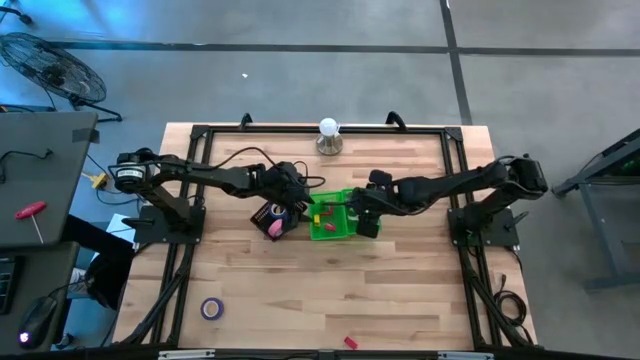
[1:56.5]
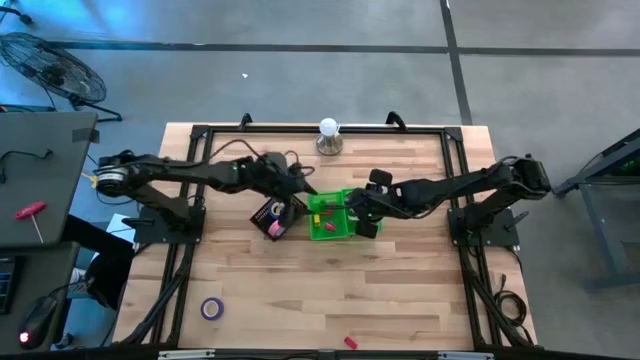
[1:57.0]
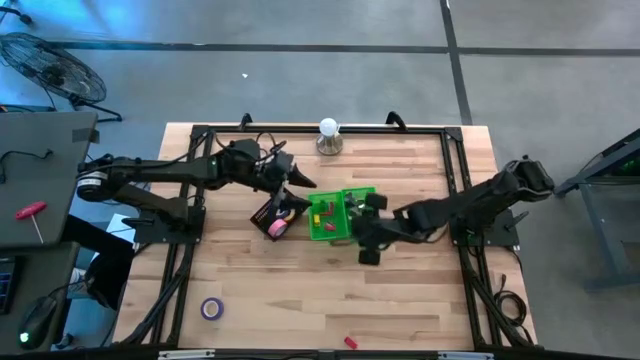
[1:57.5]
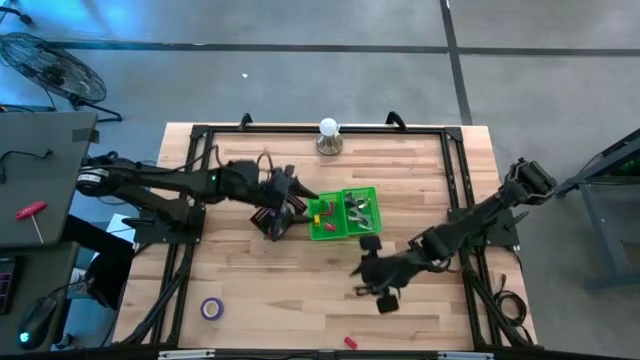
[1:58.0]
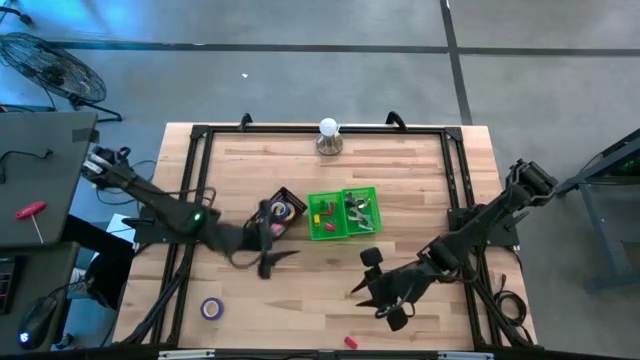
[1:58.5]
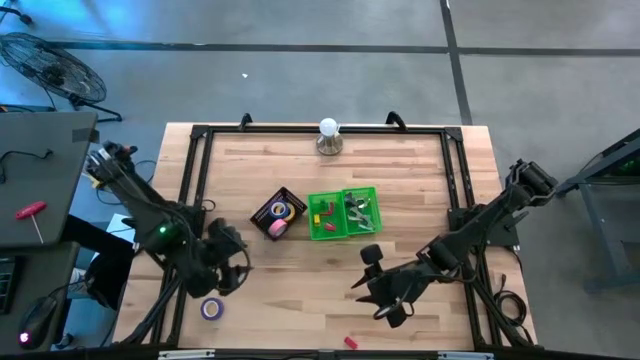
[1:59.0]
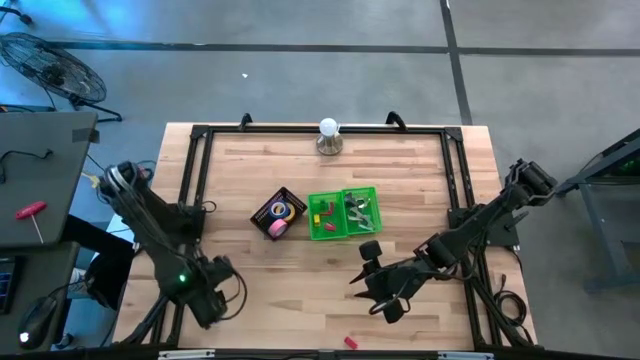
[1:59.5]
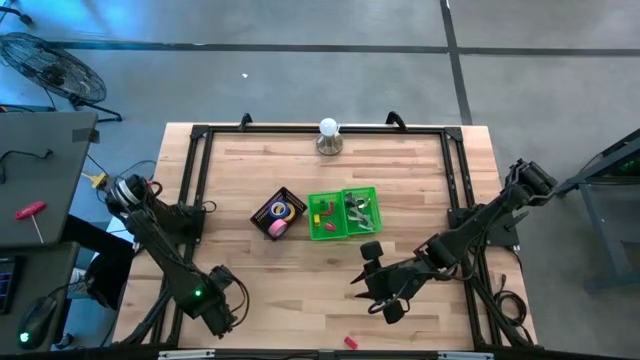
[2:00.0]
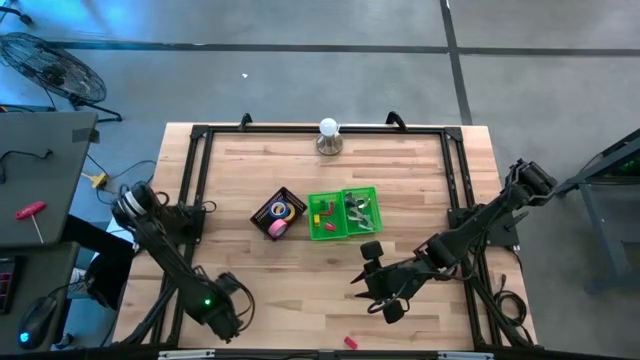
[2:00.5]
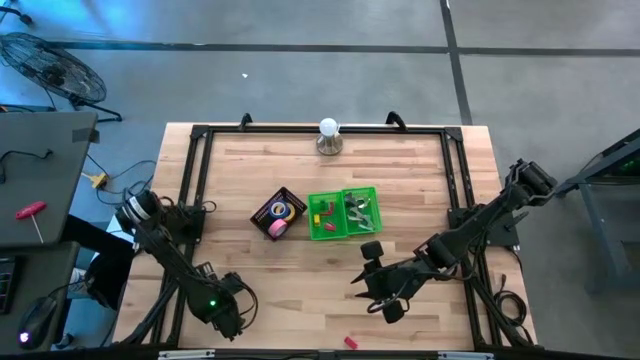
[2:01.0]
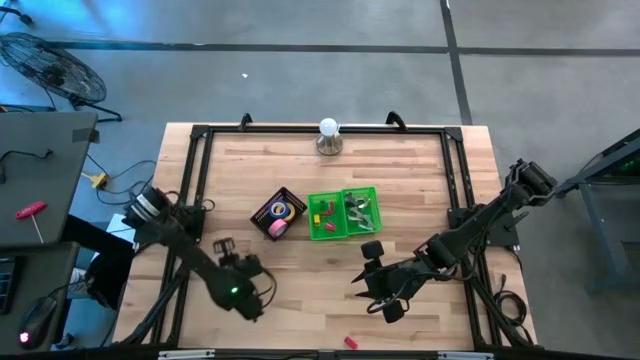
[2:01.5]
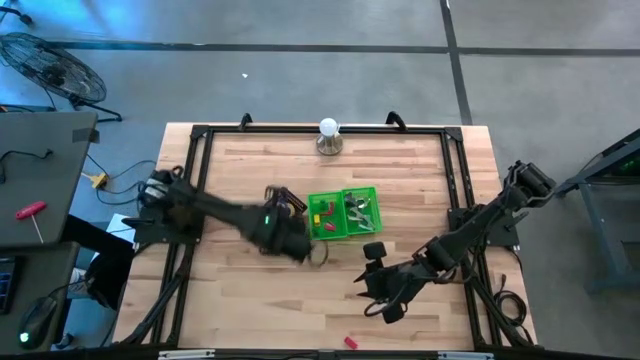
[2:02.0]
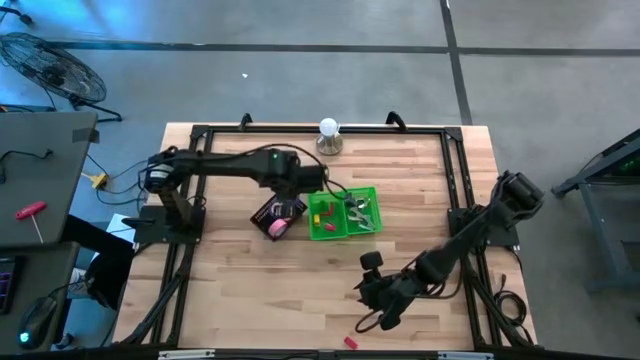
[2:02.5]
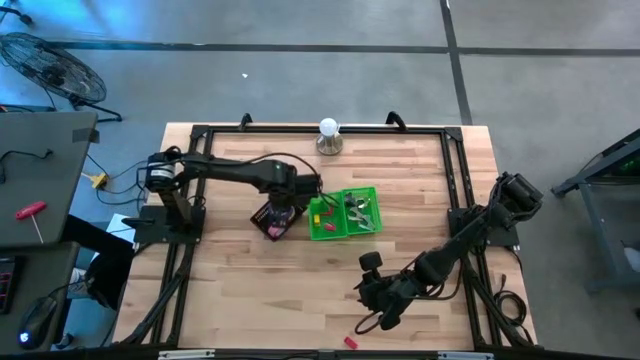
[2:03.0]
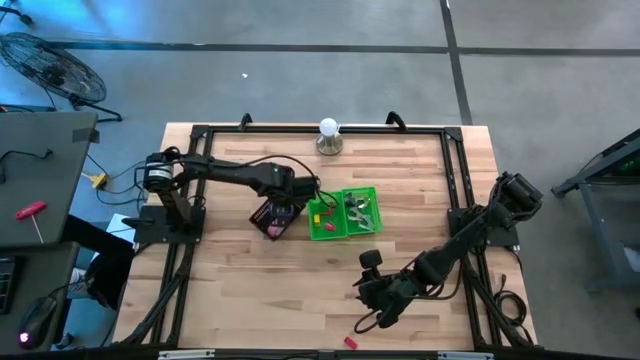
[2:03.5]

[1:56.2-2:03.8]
Task: Pick and place Stapler, Stapler remover, tape
Put the blue tape into the black bin

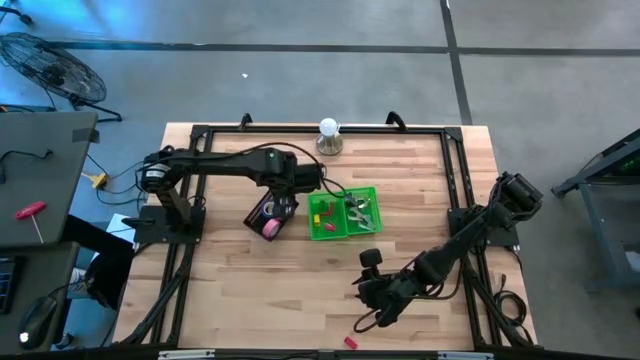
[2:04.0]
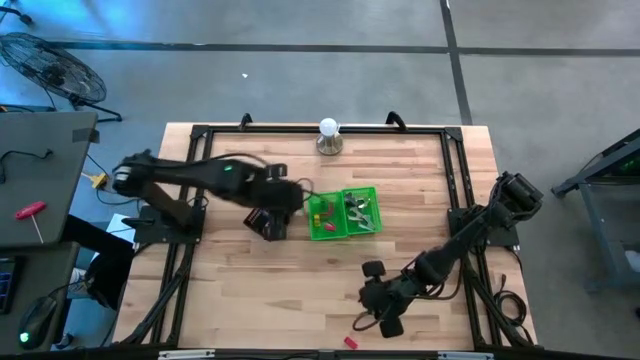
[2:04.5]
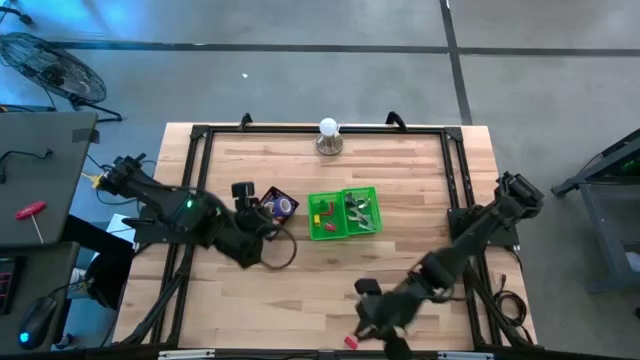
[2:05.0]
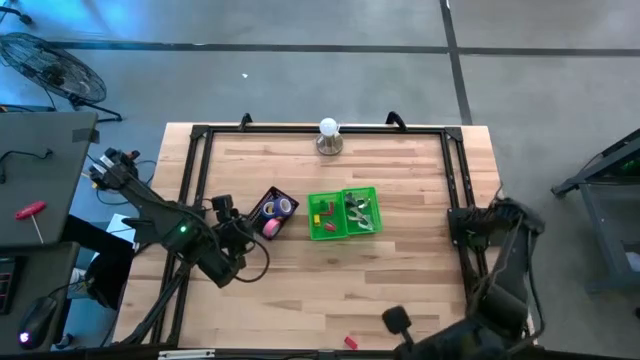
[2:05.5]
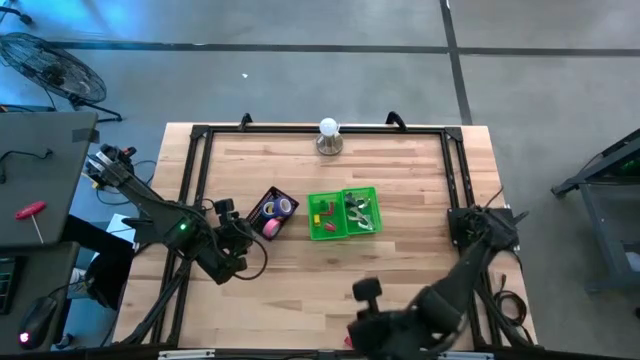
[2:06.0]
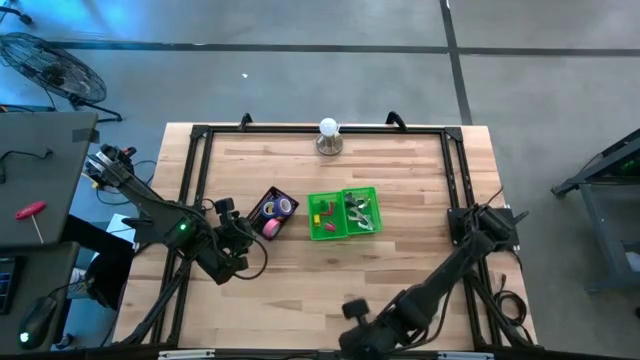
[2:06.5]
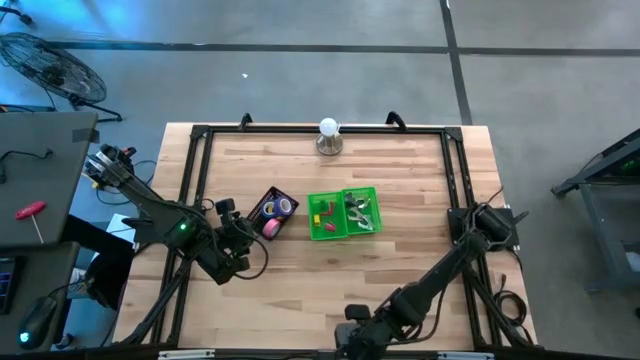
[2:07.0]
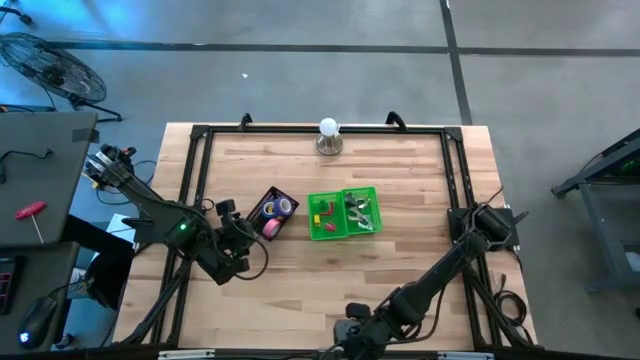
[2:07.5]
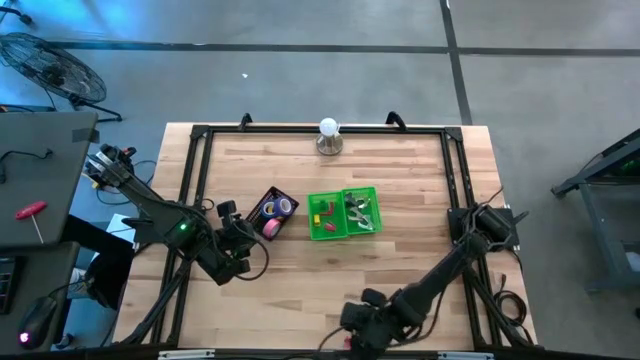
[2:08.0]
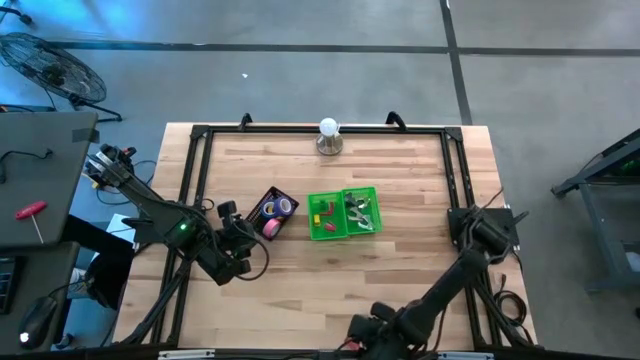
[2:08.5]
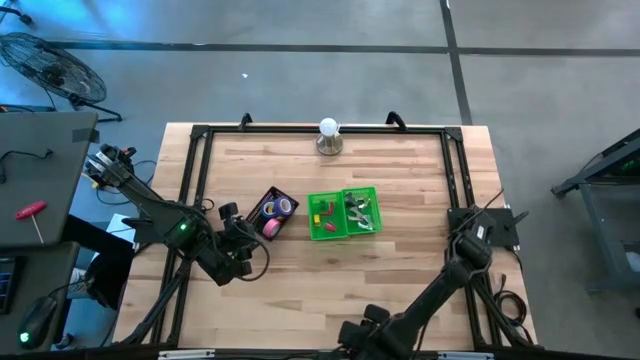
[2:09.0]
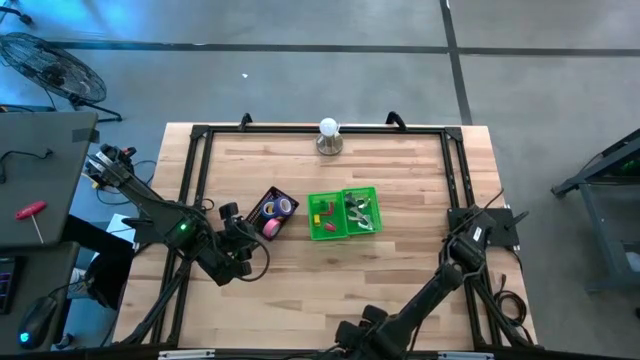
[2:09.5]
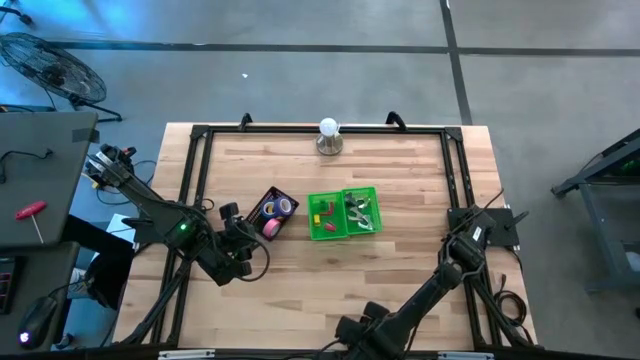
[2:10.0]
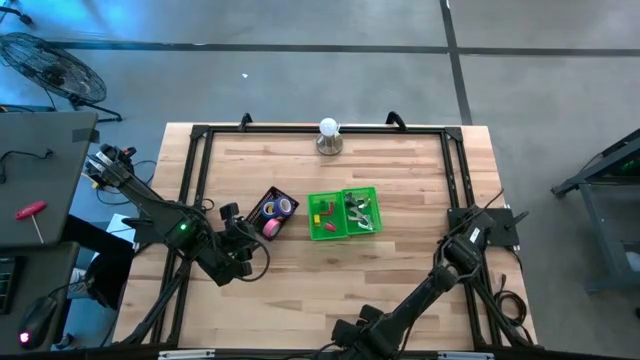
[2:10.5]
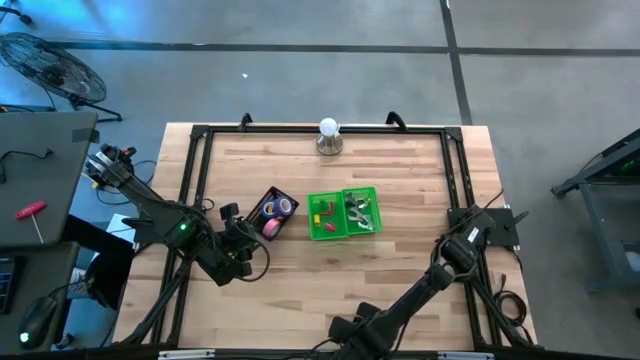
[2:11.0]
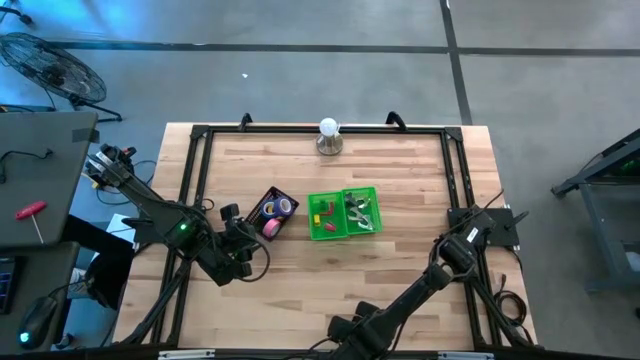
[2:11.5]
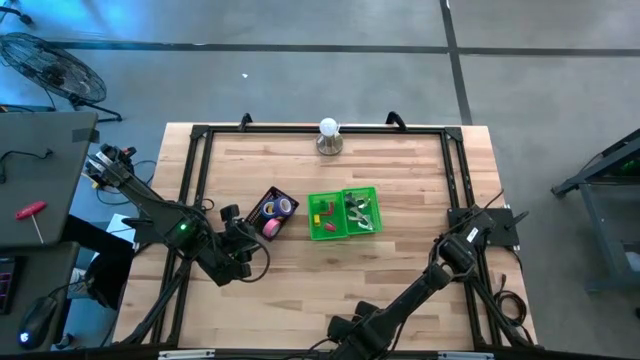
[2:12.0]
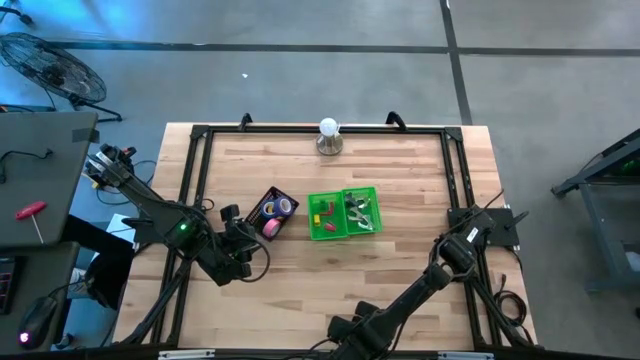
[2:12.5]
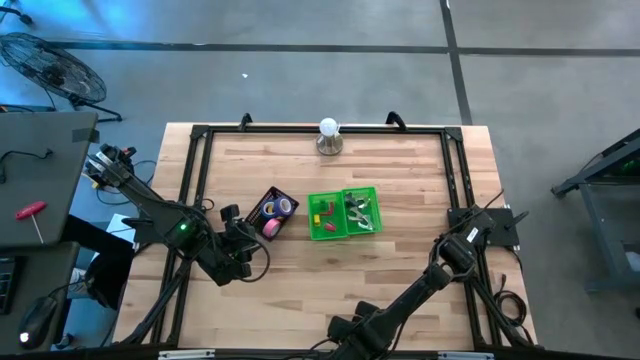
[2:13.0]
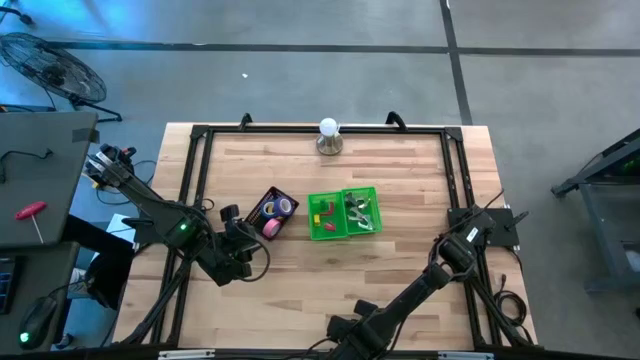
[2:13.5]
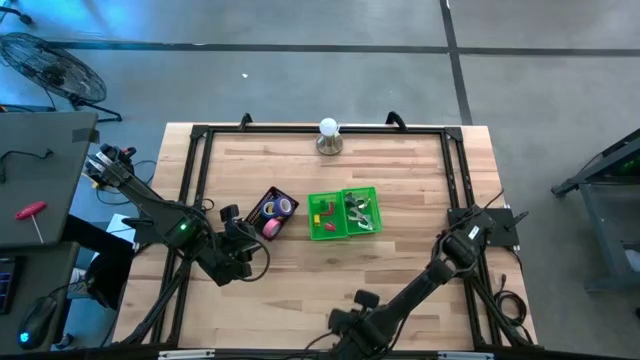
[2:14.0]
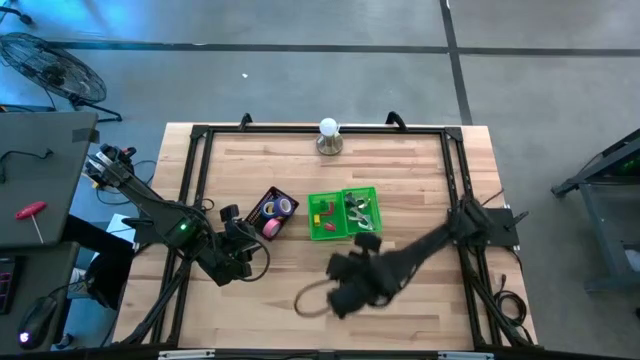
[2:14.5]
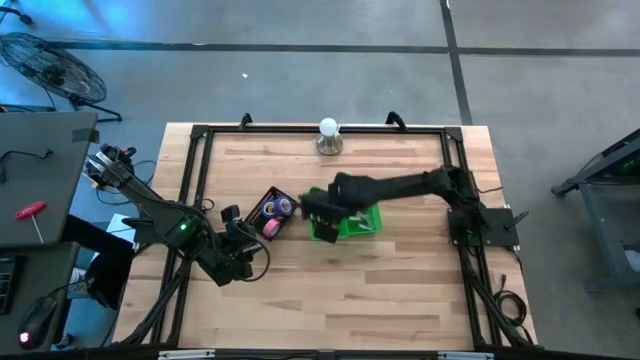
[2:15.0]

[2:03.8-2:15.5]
Put the red stapler into the left green bin

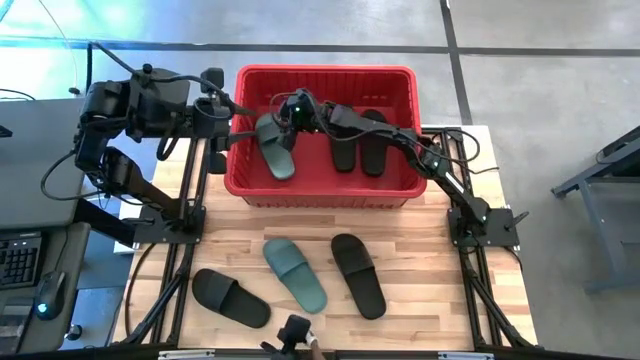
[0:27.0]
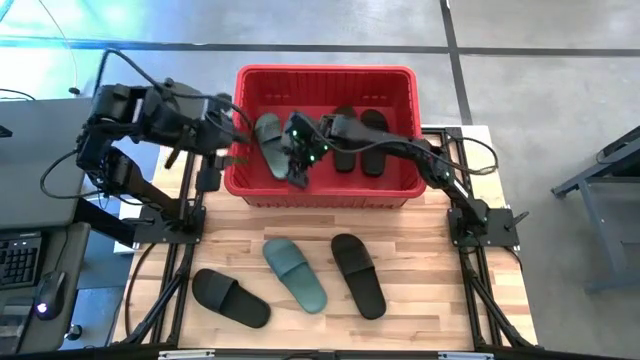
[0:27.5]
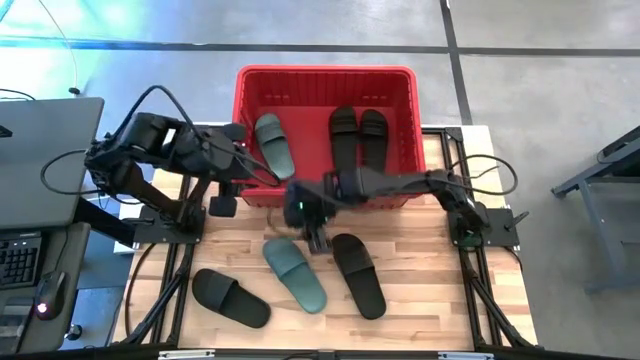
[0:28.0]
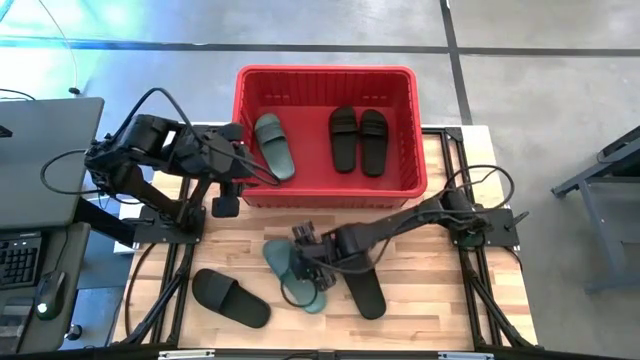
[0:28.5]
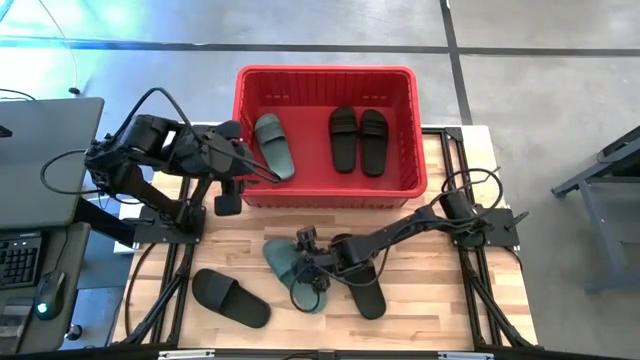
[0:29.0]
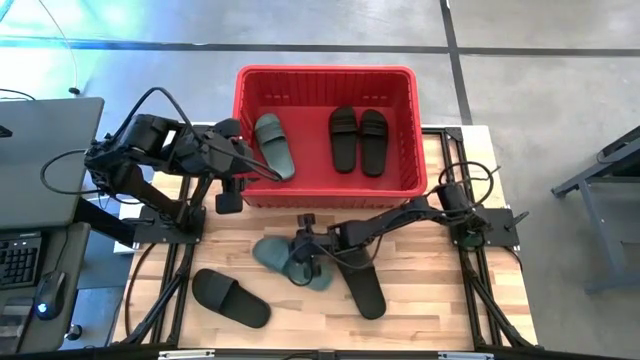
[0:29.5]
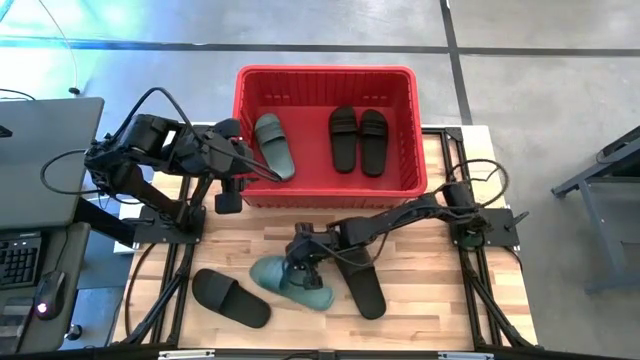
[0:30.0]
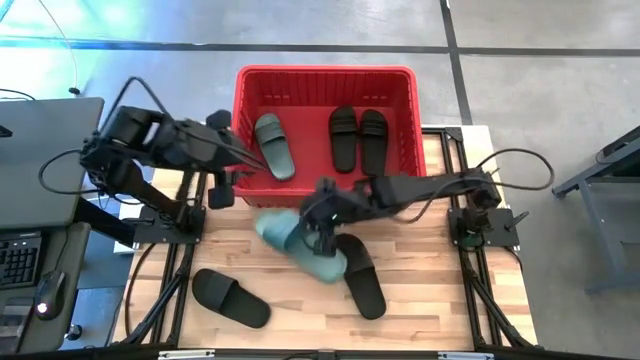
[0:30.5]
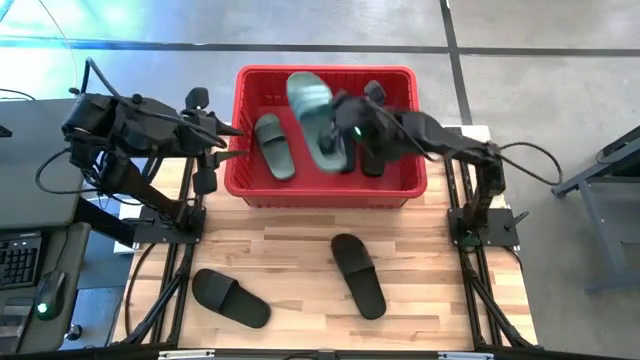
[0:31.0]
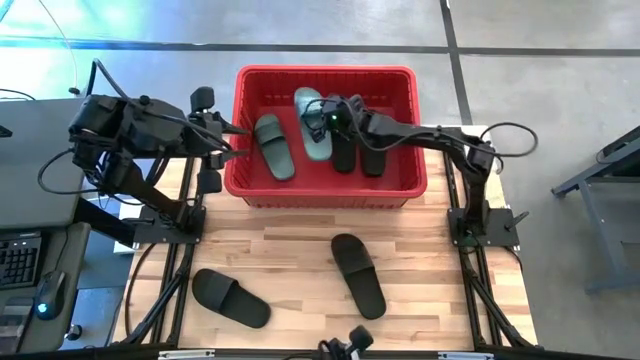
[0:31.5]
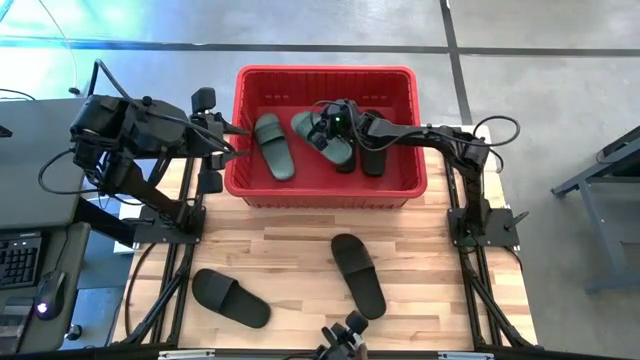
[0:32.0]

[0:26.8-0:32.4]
Task: Pick and place slides into bin
Put the green slide into the red bin
